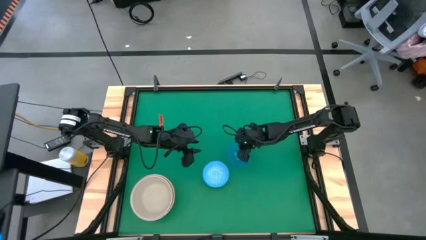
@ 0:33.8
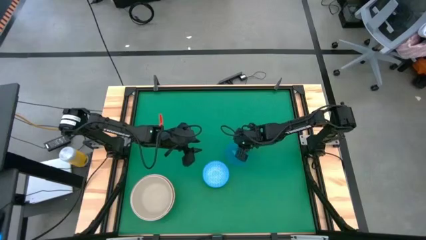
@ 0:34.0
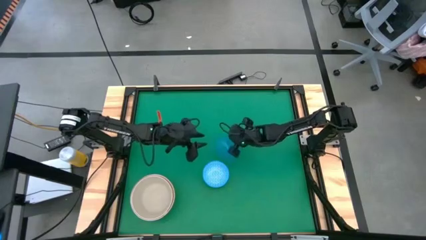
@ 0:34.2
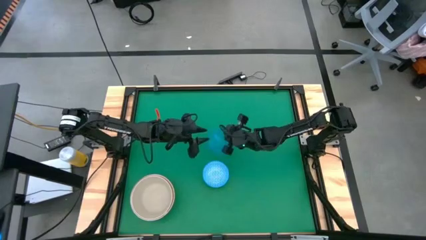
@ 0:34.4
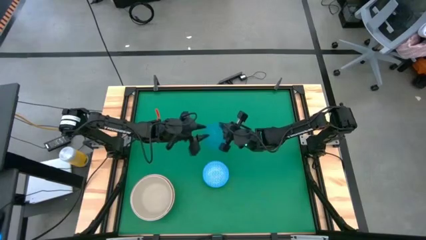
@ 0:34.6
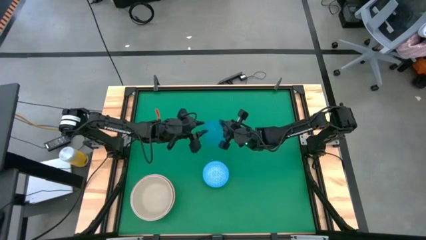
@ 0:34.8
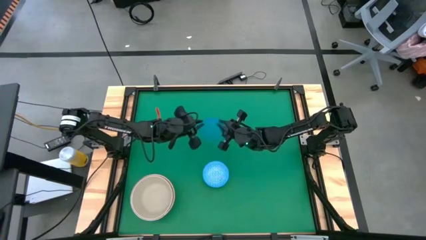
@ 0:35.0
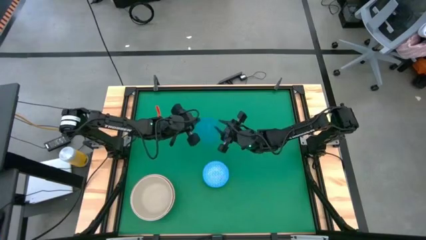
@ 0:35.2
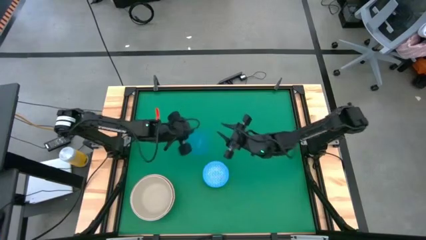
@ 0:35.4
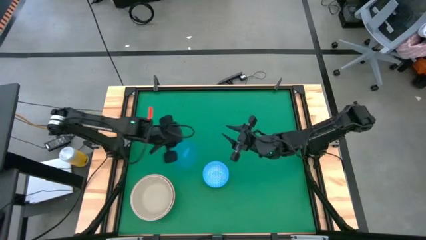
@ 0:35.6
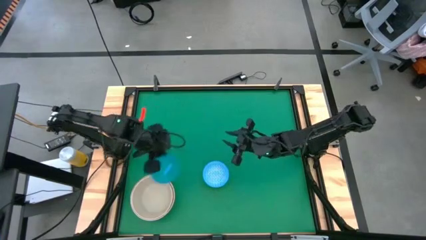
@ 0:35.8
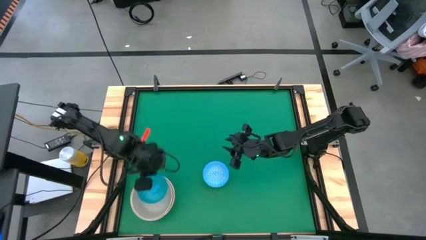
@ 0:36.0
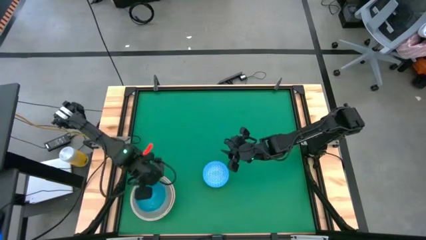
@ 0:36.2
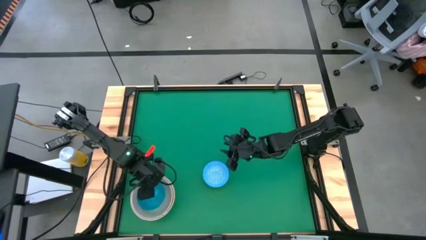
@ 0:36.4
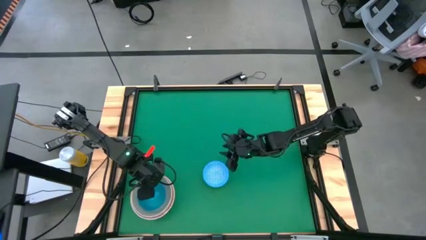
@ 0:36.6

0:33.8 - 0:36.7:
Stack the blue bowl on top of the brown bowl

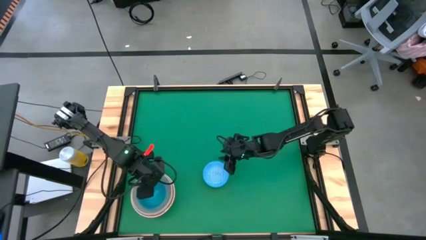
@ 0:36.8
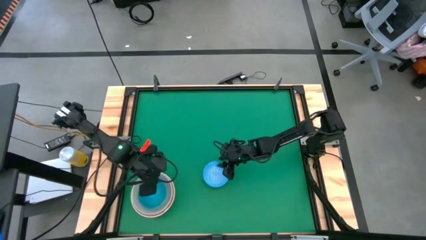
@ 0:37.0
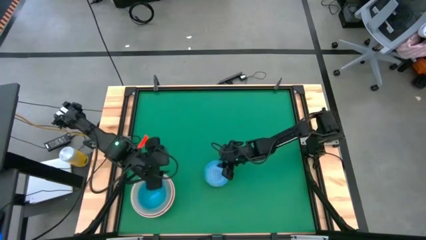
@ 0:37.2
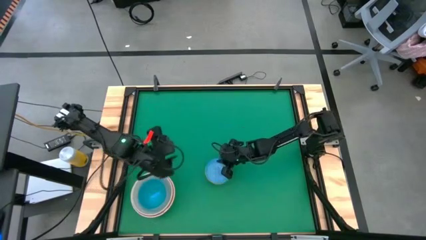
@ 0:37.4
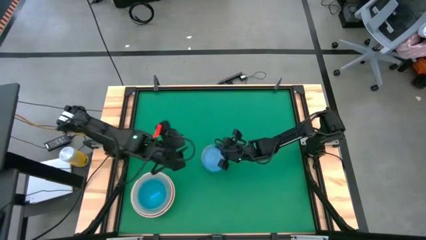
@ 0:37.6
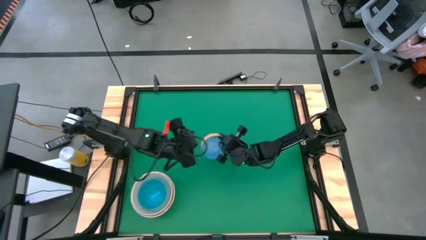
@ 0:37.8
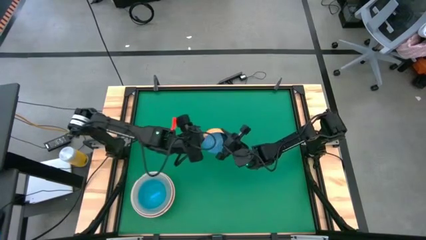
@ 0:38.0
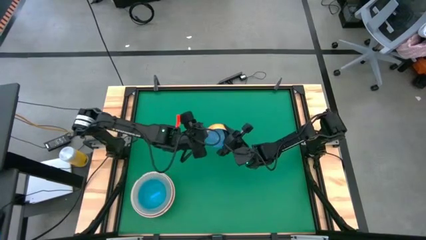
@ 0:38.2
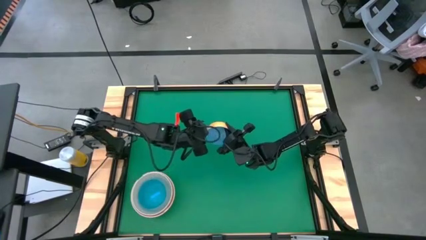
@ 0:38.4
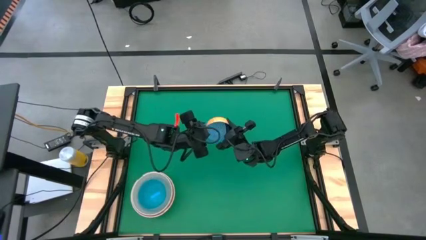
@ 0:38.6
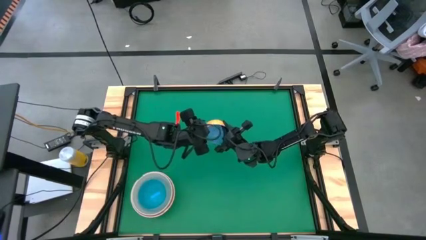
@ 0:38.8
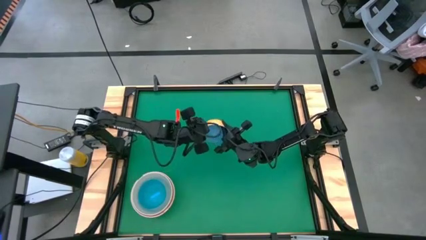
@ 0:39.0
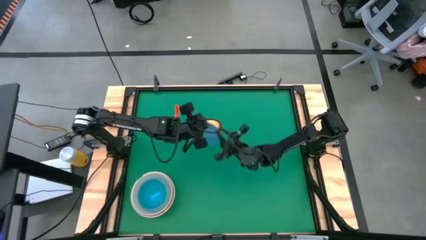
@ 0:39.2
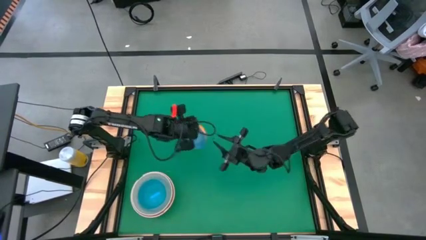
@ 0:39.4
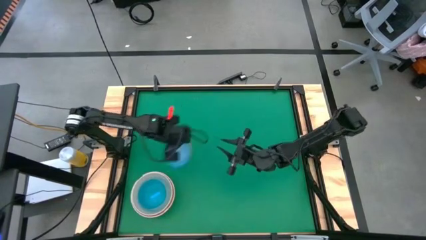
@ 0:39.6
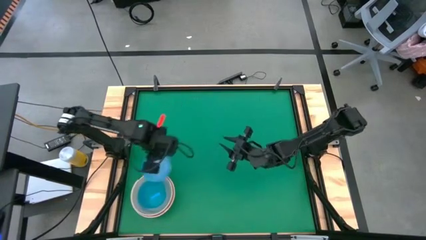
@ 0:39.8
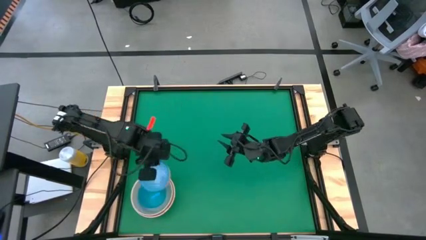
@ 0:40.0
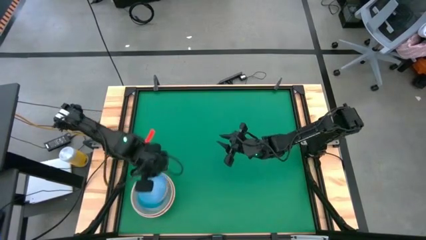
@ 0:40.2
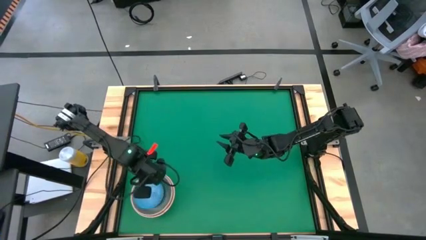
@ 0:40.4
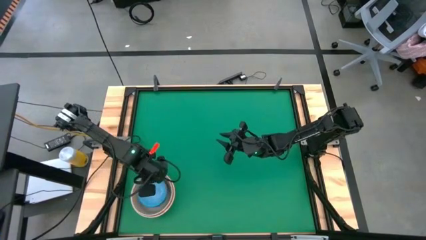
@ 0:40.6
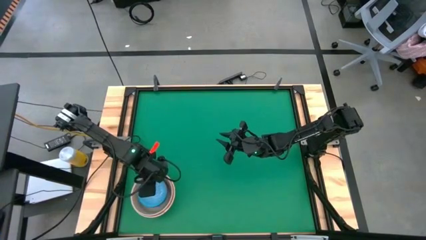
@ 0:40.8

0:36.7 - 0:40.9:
Stack the blue patterned bowl on top of the blue bowl

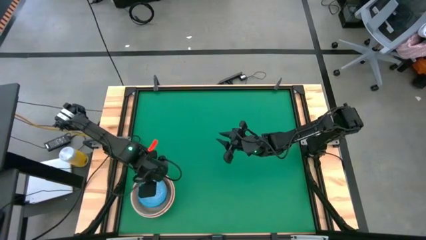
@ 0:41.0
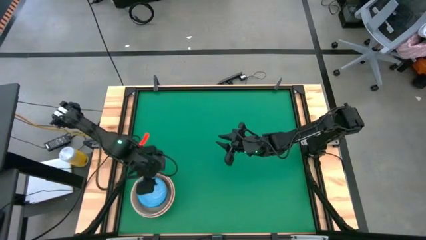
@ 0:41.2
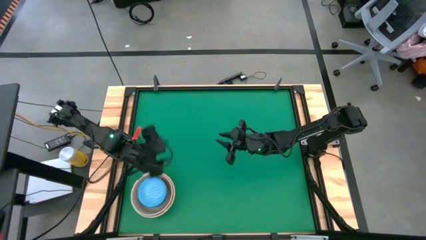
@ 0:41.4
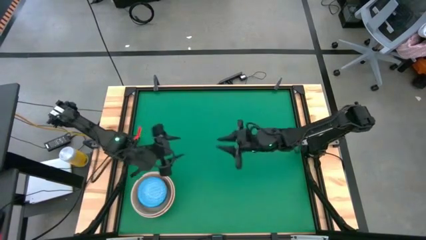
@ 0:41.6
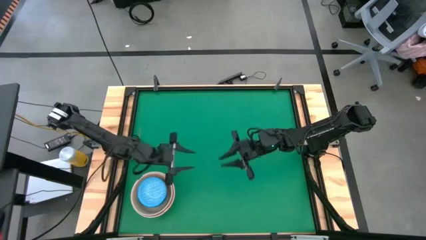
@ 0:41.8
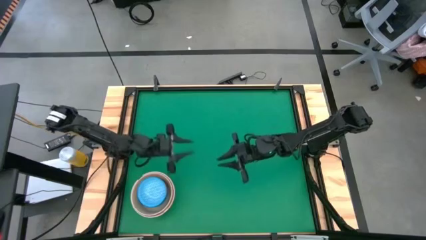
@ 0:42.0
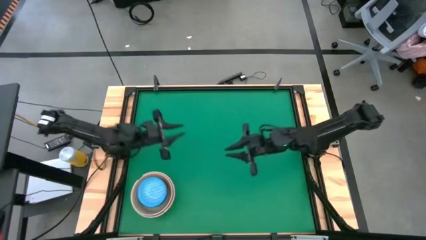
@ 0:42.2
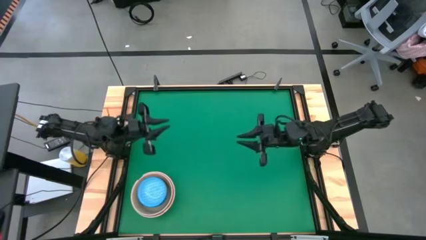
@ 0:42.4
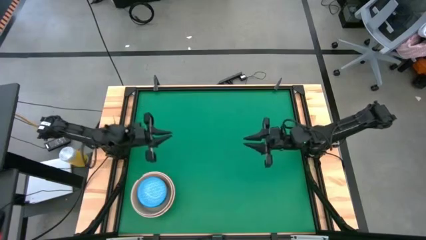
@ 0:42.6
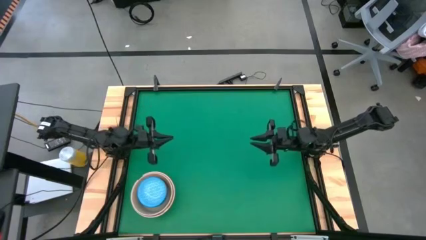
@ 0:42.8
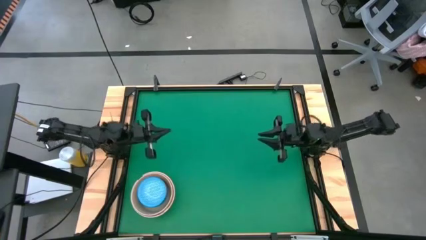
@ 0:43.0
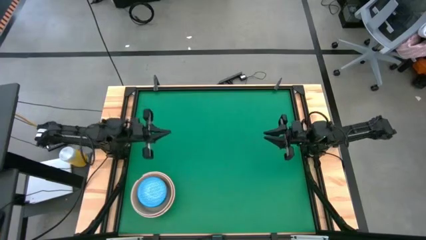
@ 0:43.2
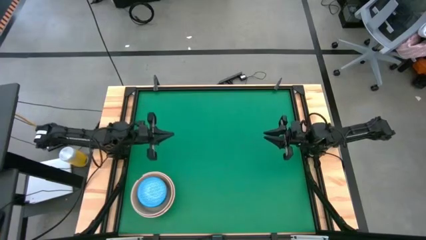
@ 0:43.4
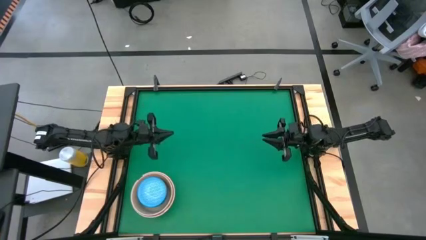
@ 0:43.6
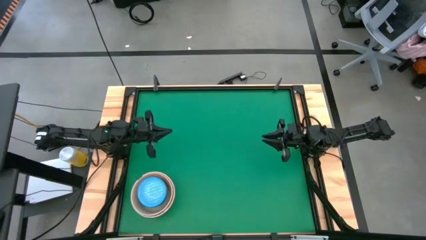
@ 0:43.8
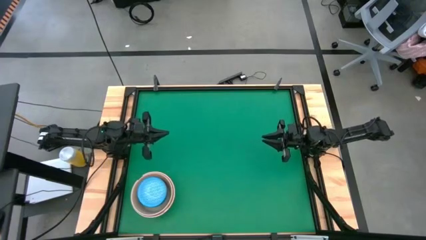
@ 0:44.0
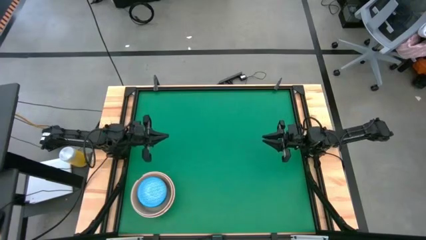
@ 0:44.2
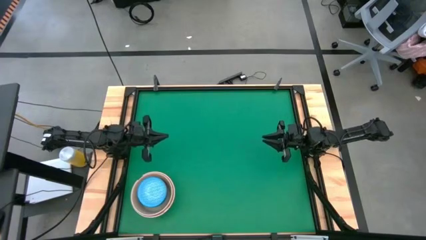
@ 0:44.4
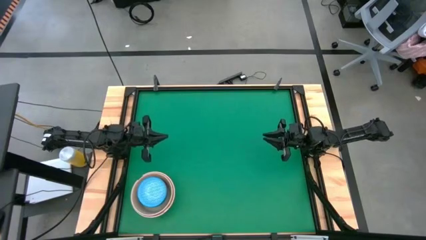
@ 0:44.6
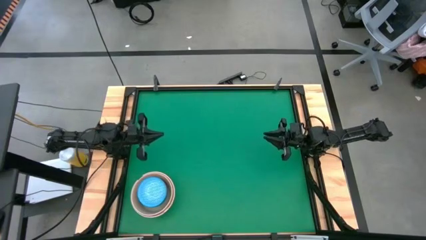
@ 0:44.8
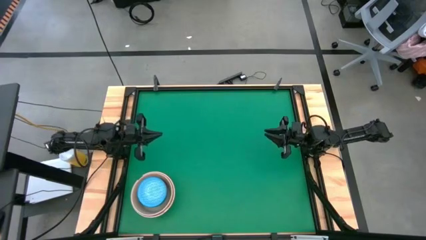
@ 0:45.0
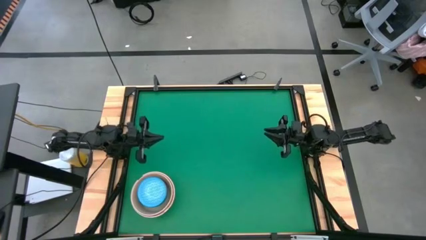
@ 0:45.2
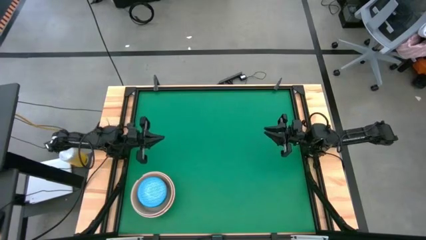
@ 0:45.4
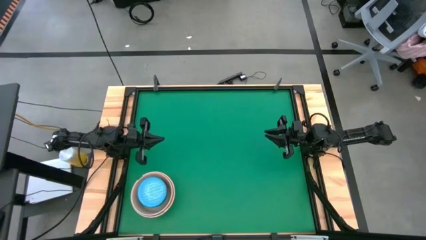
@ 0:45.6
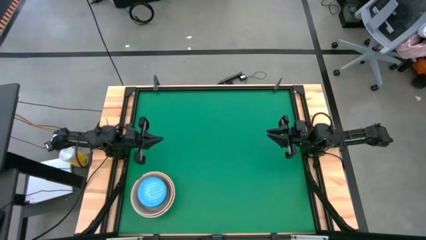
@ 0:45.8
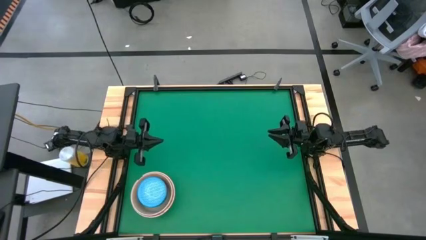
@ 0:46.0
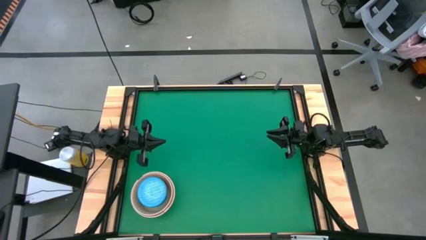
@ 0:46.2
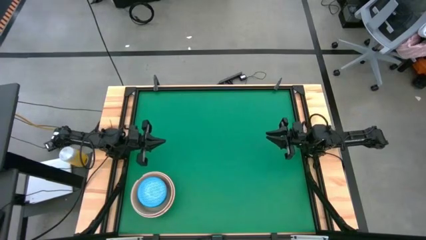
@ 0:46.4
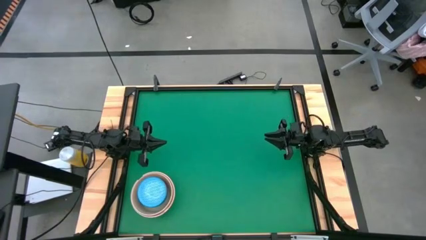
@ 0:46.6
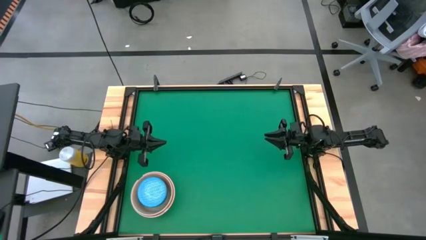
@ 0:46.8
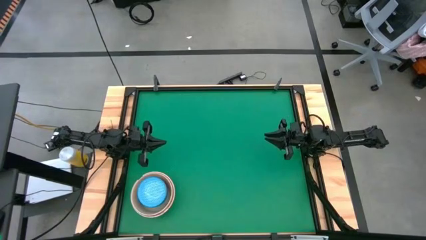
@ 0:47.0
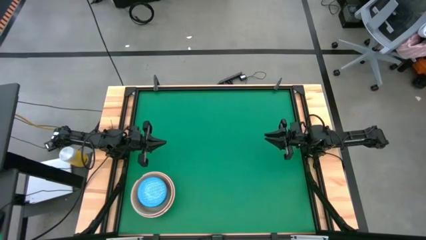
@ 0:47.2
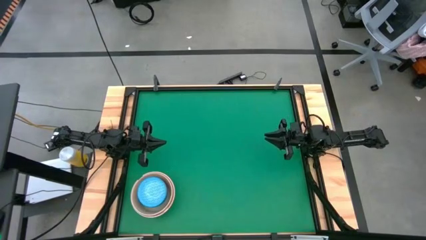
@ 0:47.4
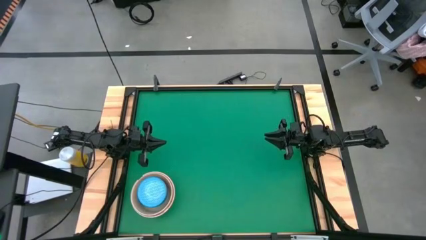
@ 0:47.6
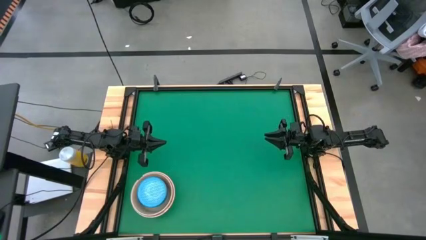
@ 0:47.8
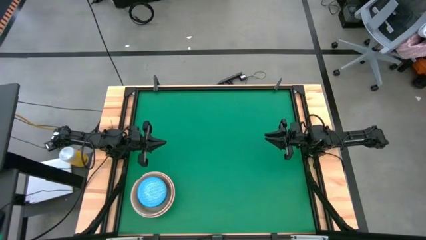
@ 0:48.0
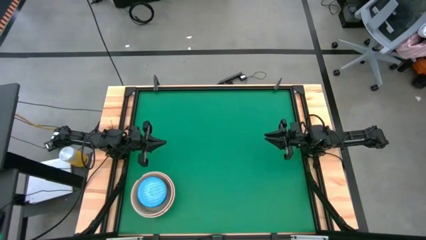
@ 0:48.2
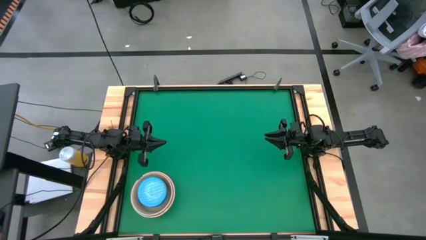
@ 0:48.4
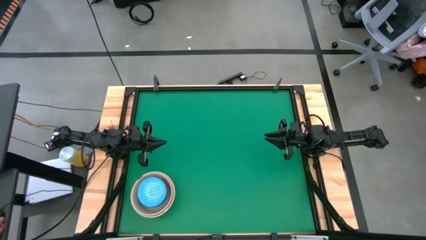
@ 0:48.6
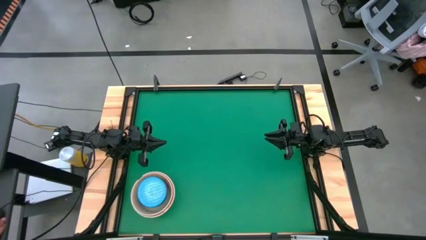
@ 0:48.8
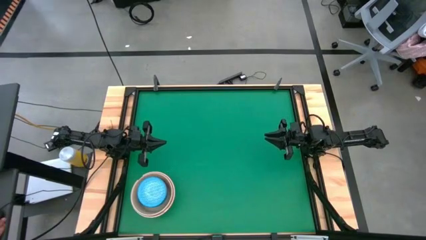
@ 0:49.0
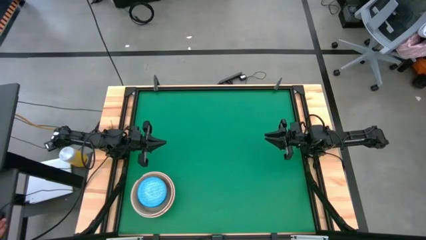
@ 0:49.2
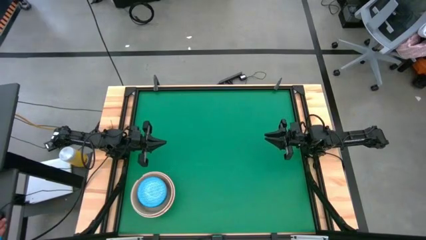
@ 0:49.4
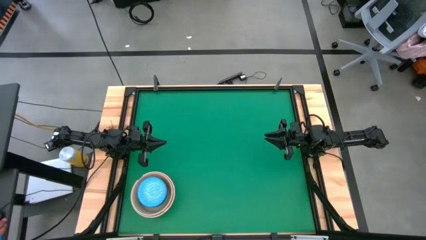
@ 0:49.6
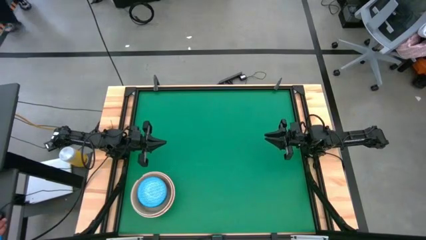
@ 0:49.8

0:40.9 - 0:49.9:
Return to Home Position
